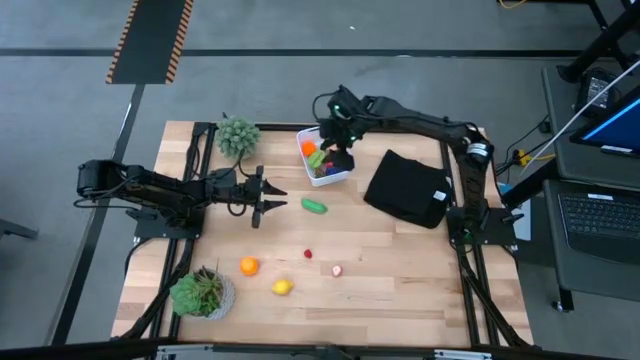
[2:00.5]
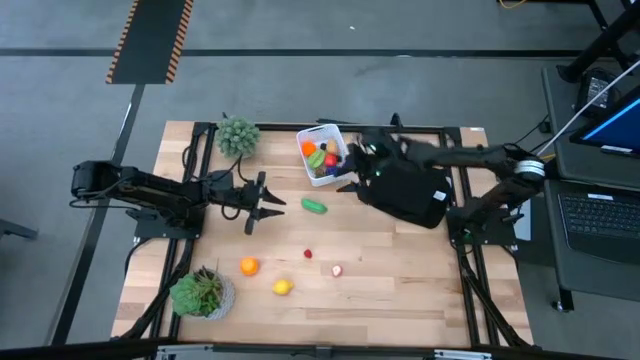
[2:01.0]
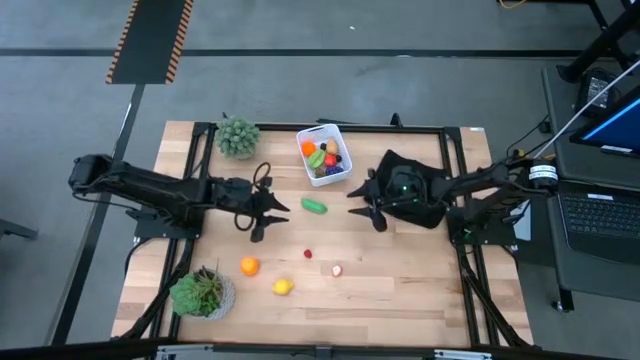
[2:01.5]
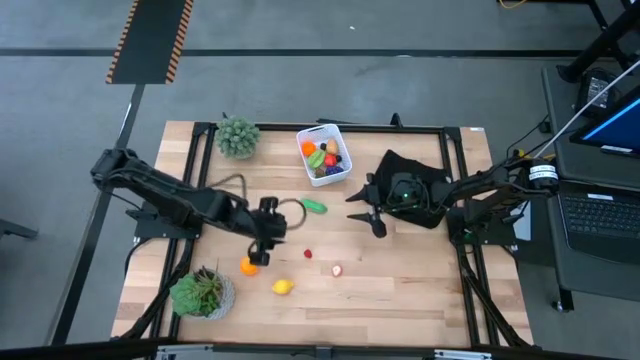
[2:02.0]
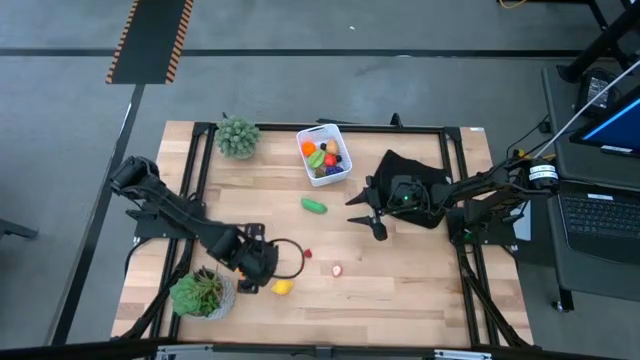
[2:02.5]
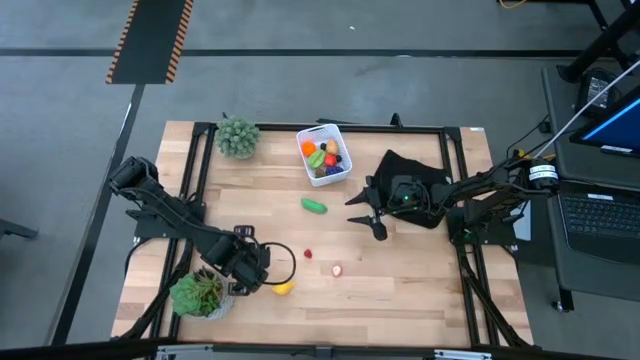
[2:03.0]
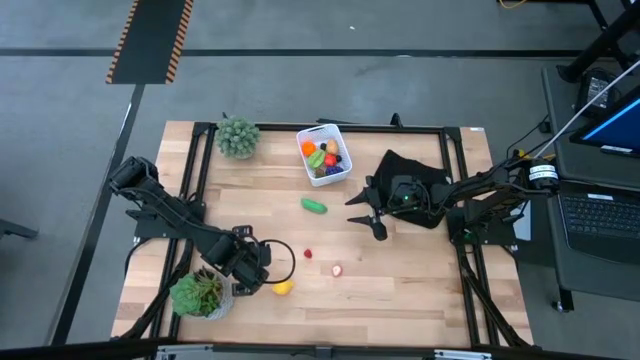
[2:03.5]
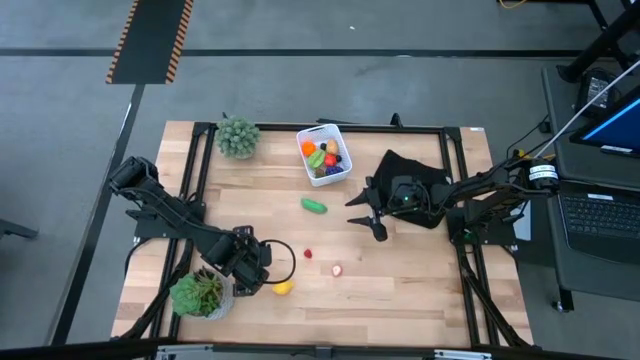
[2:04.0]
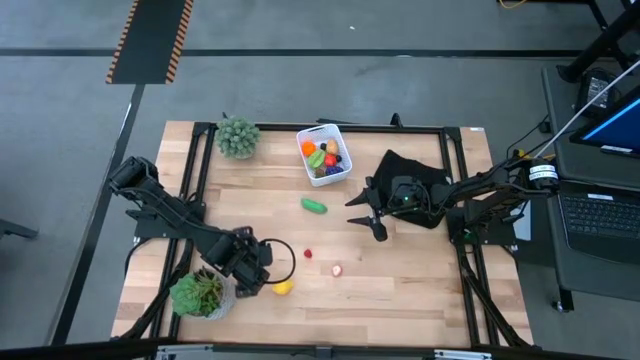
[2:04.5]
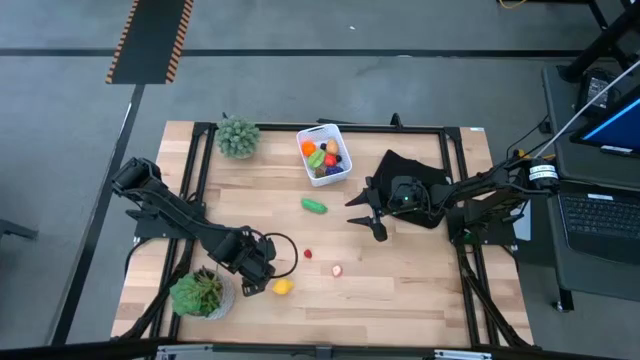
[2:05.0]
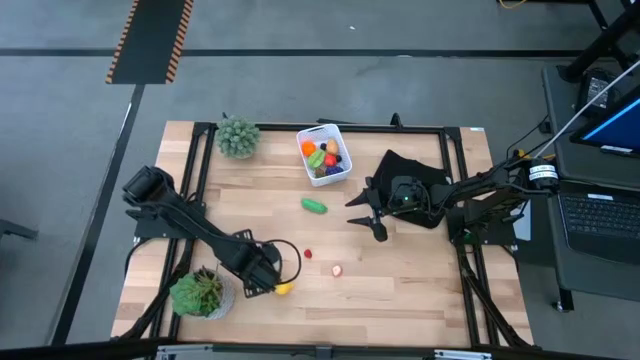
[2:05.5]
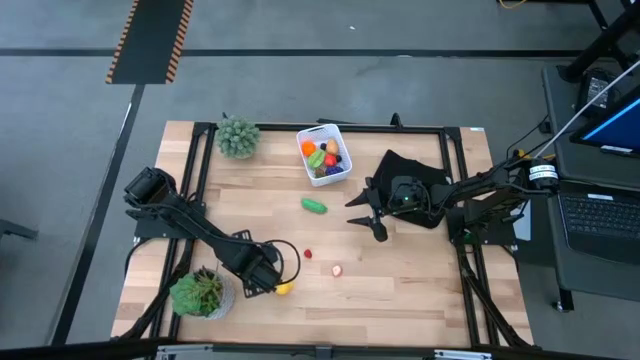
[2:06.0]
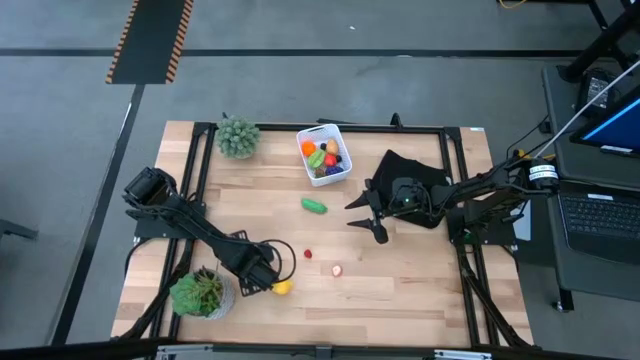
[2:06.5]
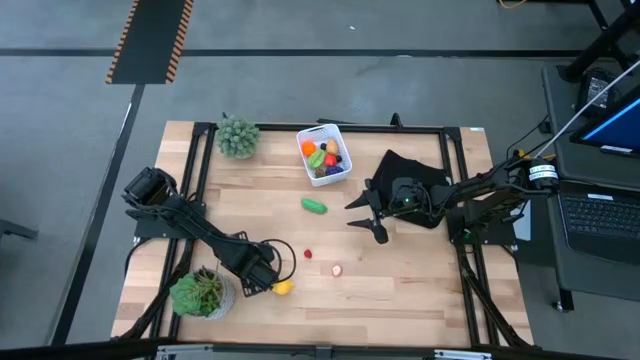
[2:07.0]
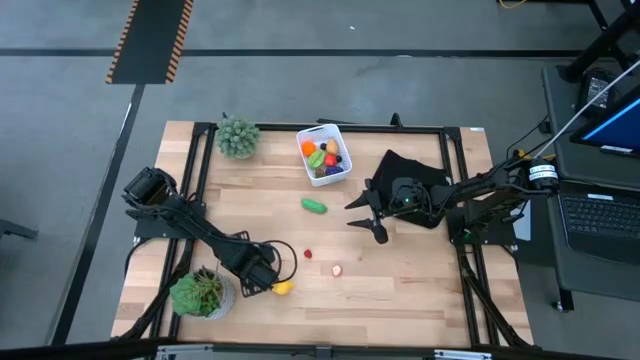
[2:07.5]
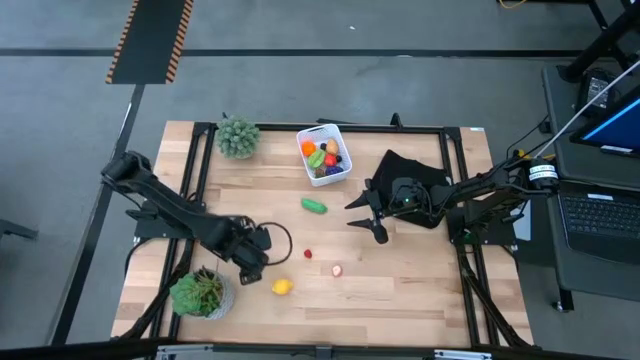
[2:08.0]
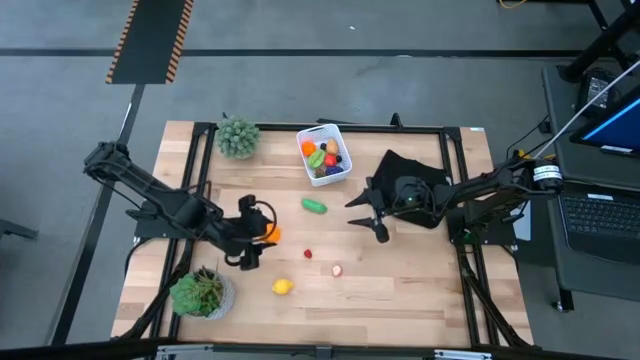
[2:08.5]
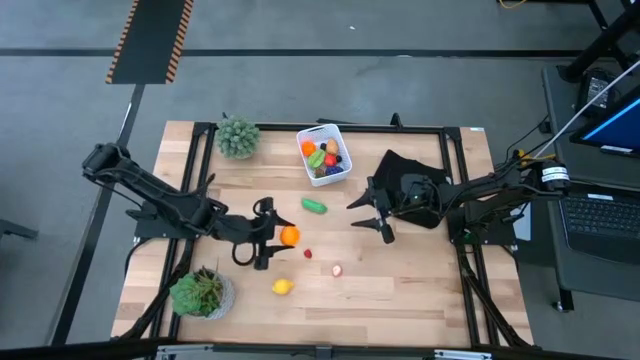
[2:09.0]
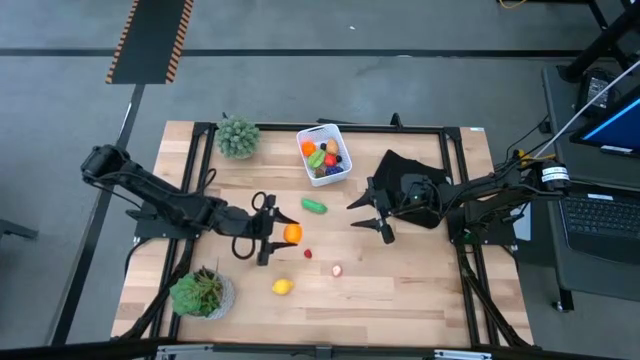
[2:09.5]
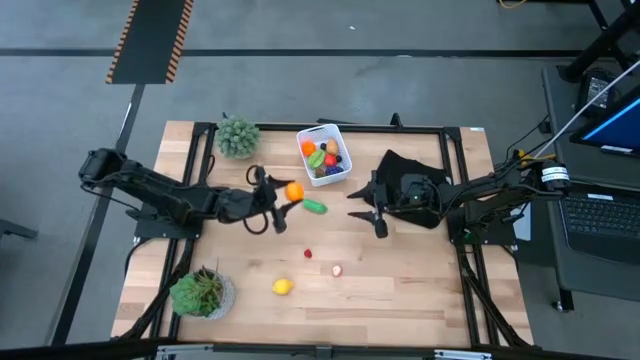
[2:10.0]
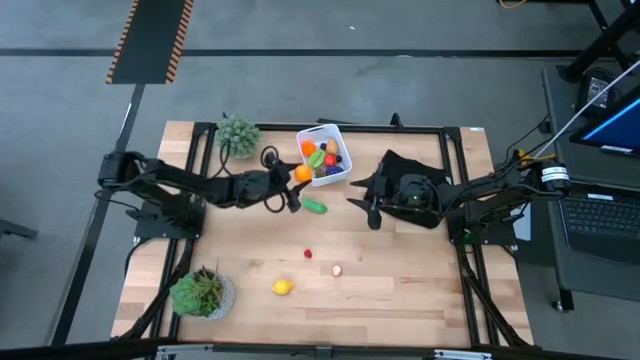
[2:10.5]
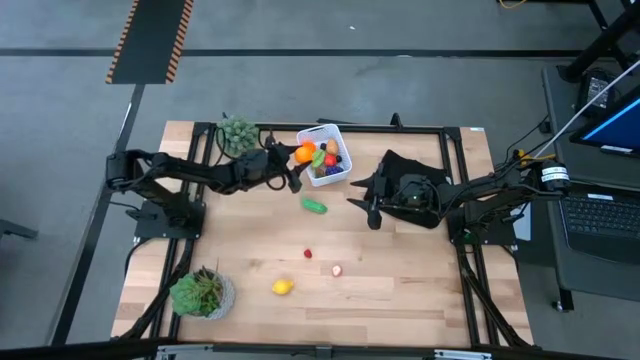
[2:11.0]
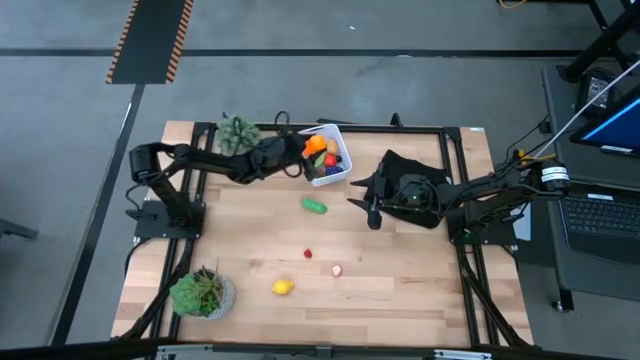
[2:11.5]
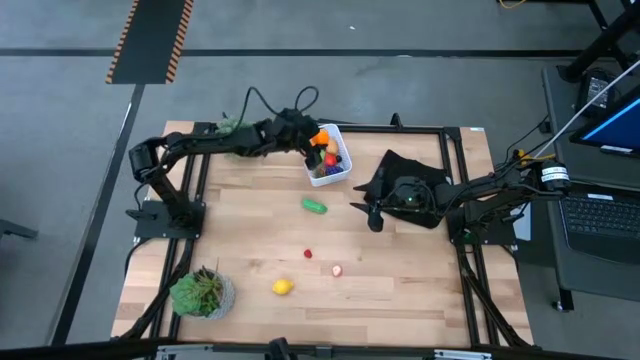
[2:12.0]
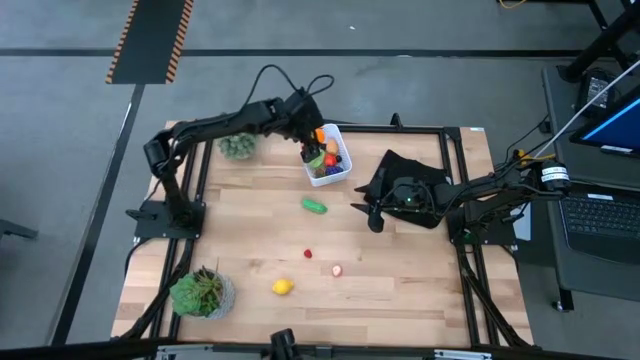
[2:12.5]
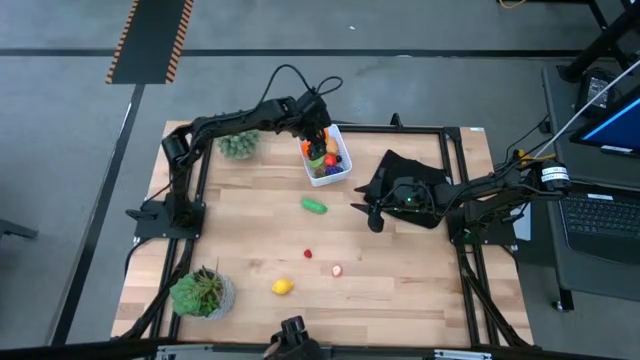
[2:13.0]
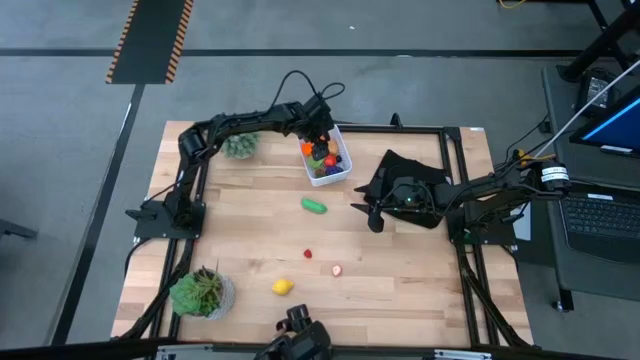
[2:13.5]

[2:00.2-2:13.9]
Task: Pick and placing Produce into tupperware
Put the orange into the basket

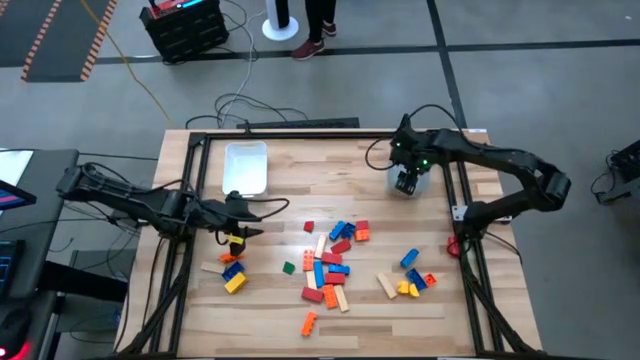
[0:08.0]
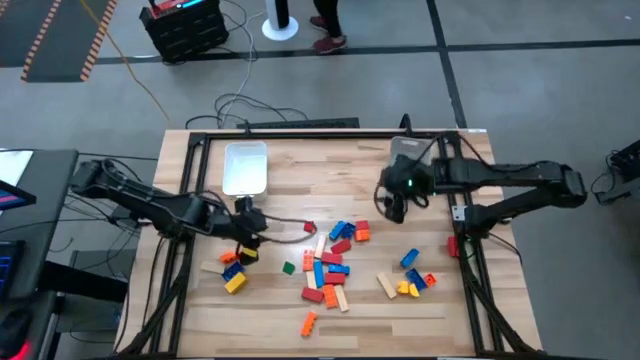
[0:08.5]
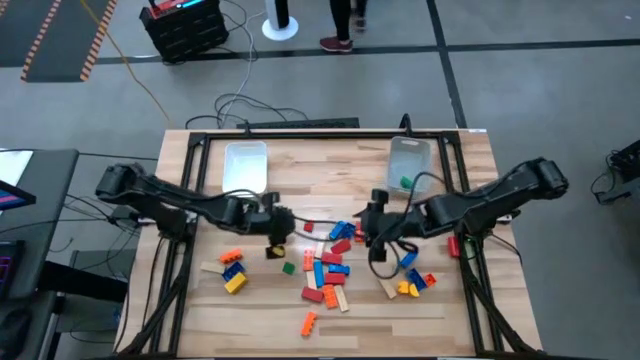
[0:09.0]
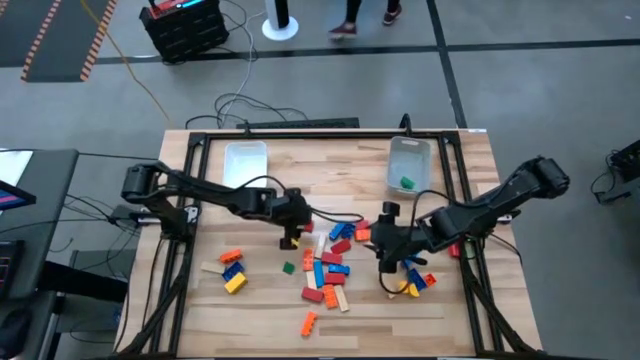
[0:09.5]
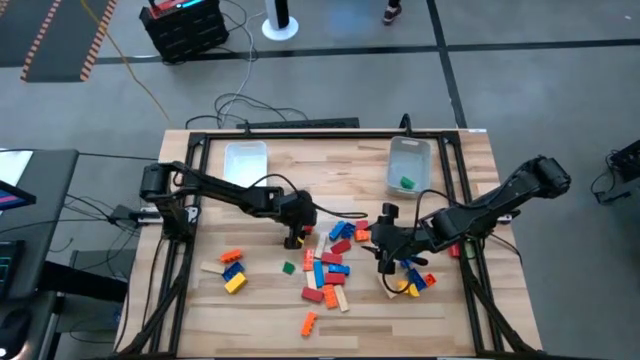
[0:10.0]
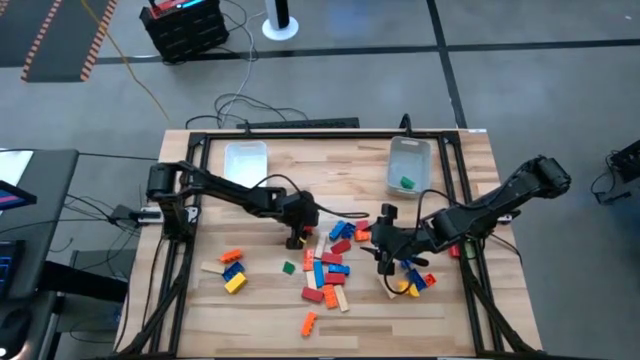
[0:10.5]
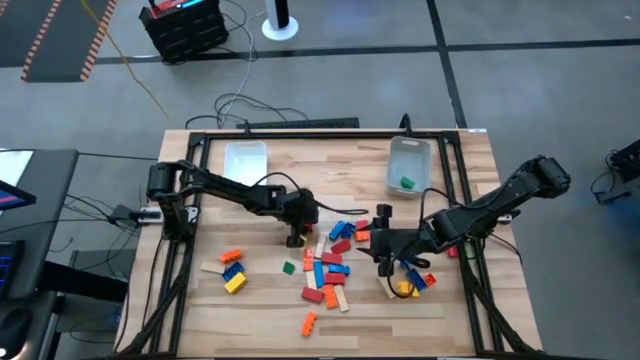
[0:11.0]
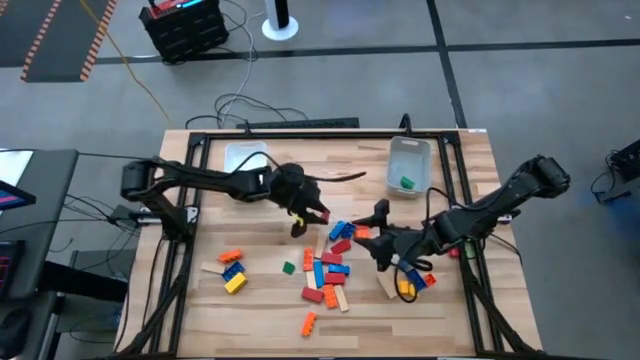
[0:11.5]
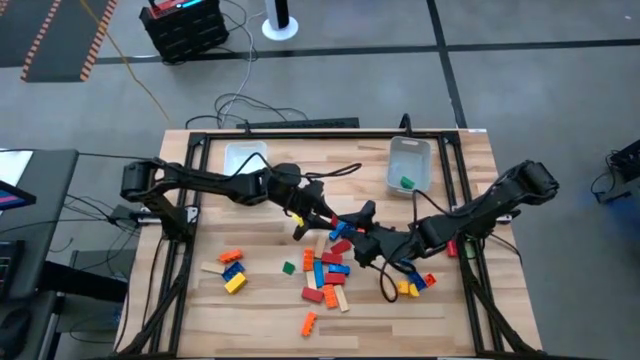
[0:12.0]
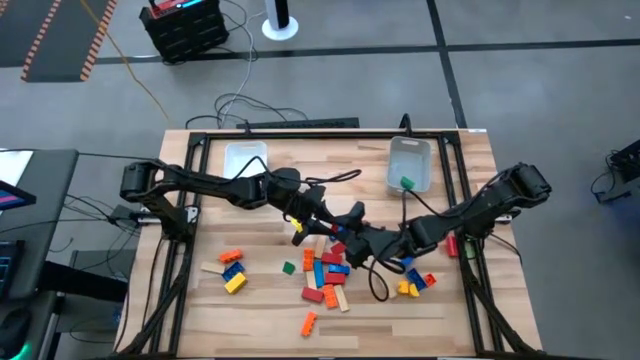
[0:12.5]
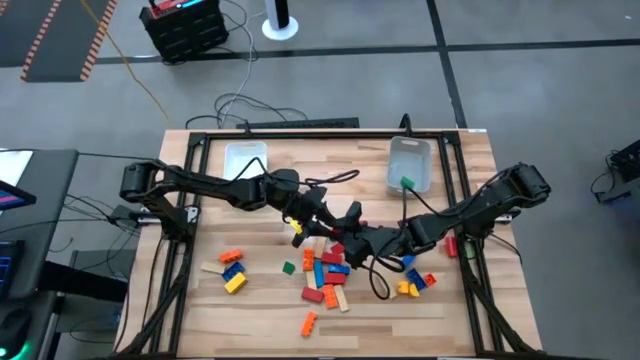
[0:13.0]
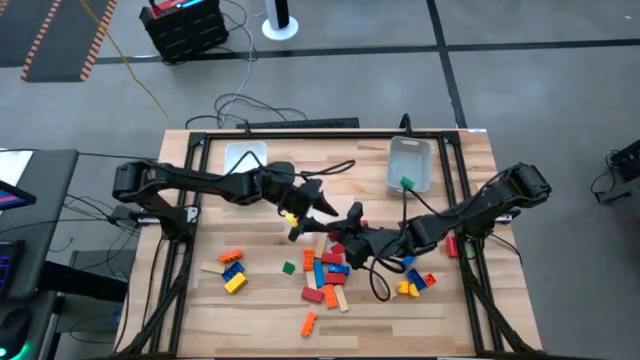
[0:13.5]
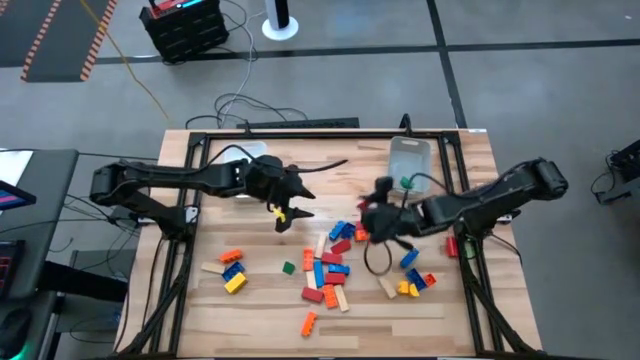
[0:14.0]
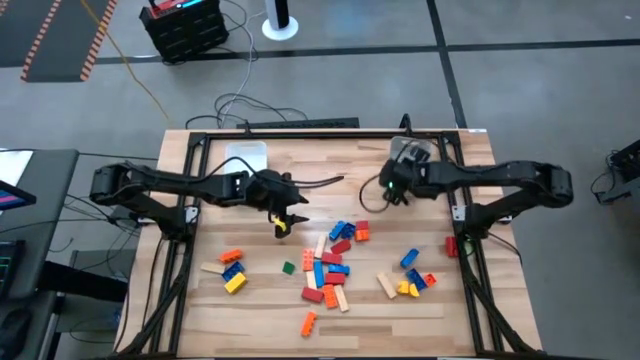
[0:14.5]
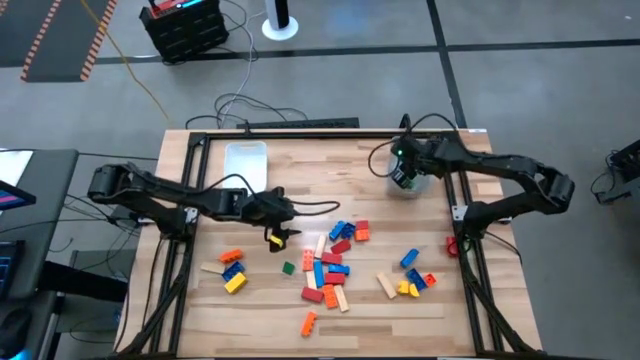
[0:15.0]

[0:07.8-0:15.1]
Task: Sort blocks by size
Put the small red block into the gray bin
